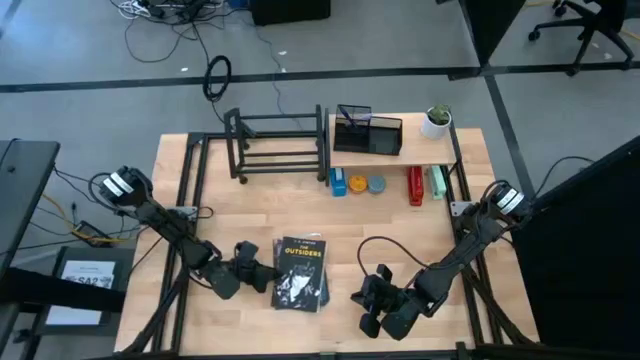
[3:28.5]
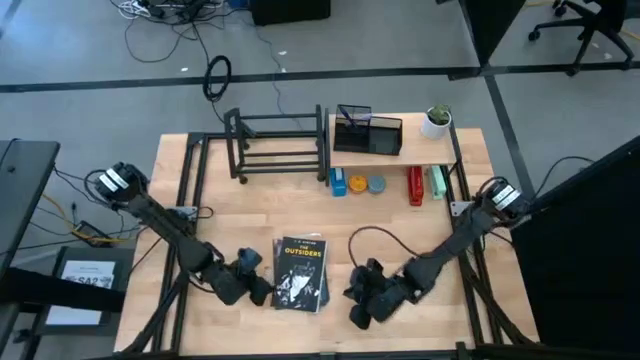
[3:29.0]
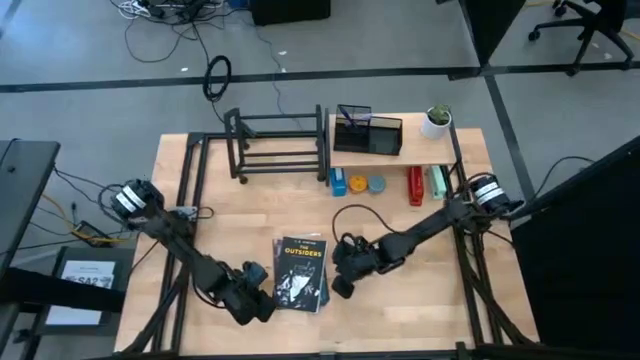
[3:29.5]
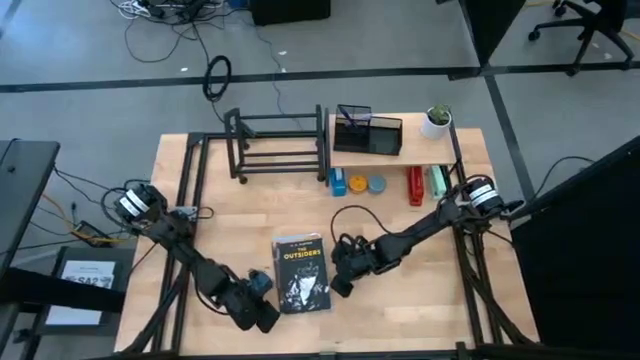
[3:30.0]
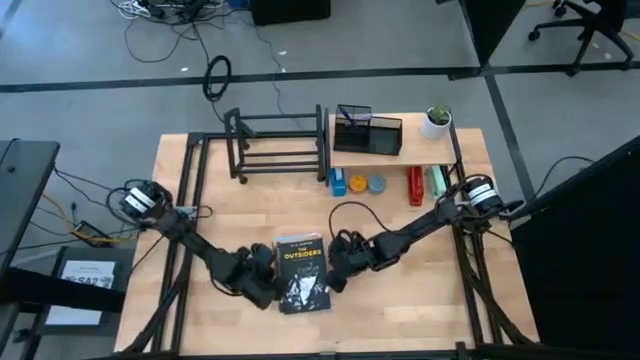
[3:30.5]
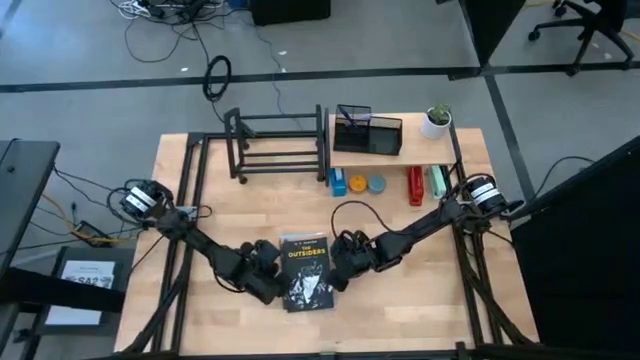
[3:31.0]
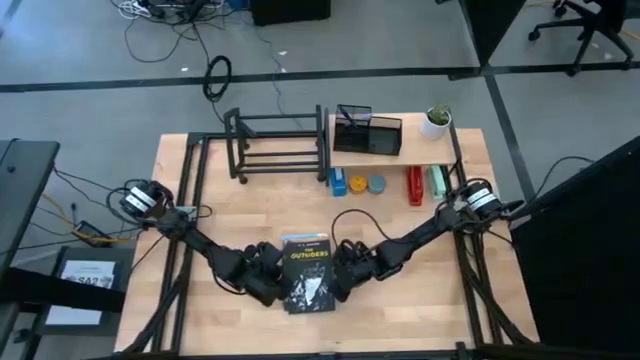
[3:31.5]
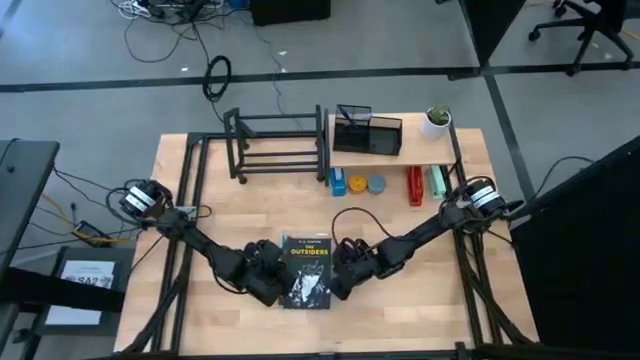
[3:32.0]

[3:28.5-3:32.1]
Task: Stock shelves
Adjust the books on the center of the table

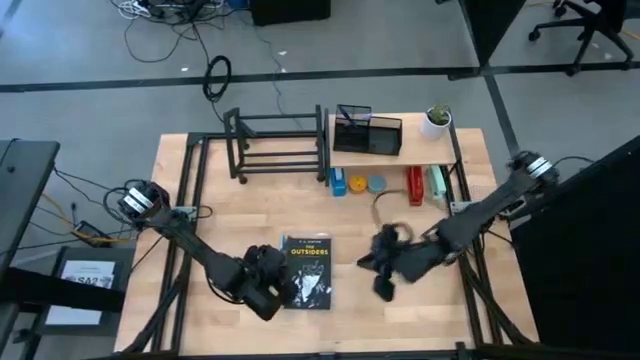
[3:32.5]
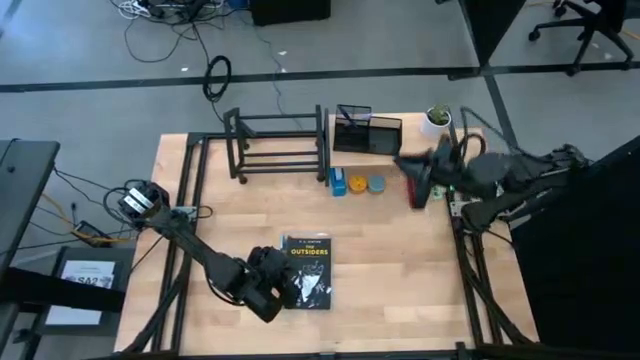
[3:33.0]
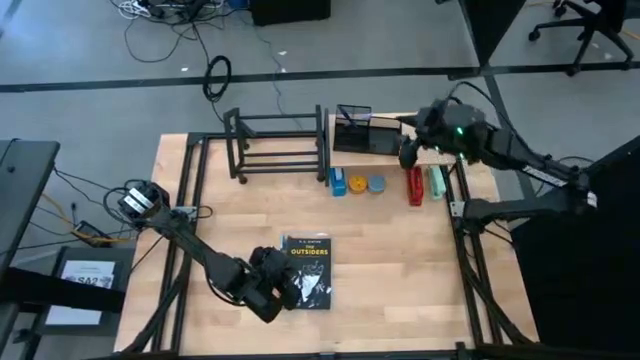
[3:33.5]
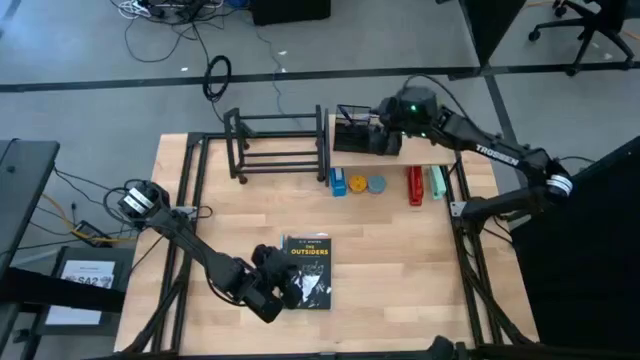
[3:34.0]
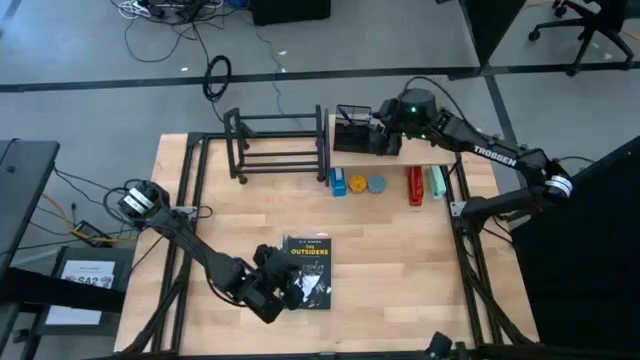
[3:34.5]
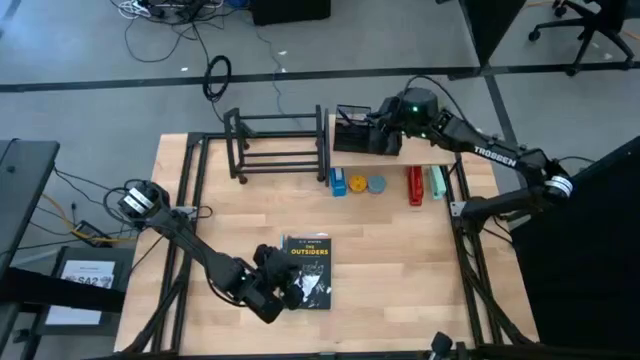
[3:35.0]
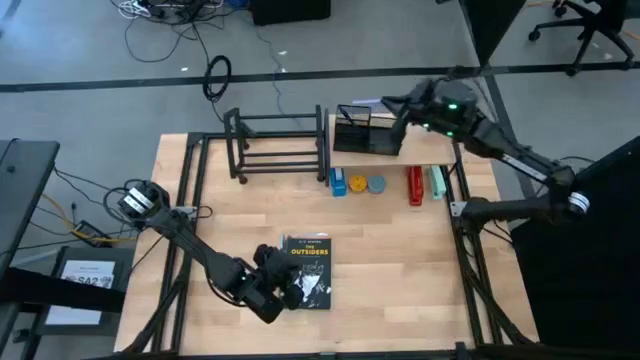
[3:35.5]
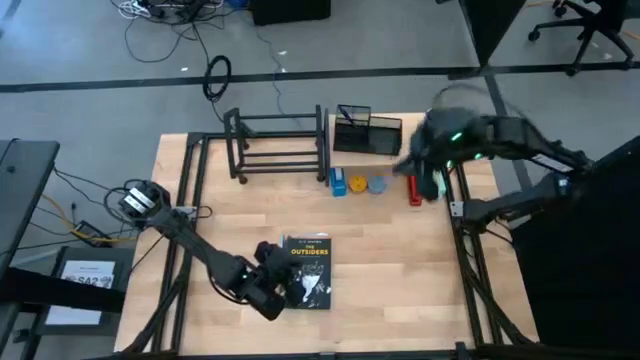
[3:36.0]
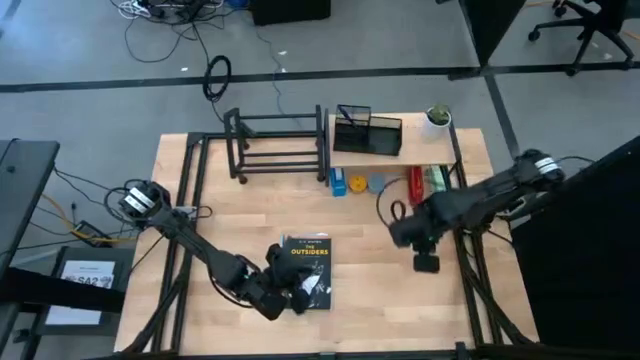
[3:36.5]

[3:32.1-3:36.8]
Remove the purple ballpen from the pen holder

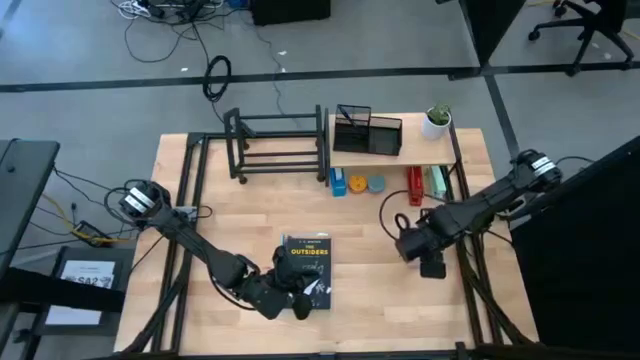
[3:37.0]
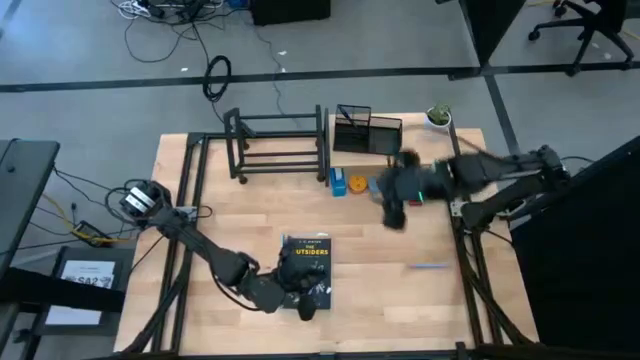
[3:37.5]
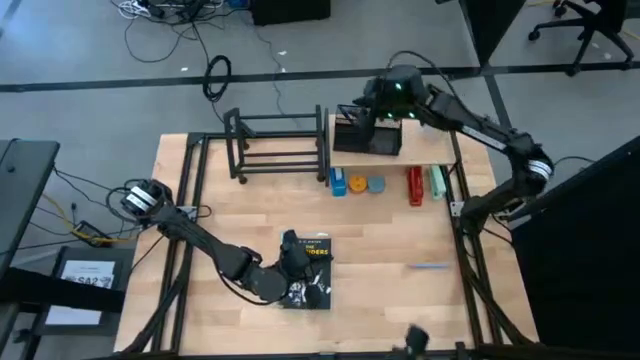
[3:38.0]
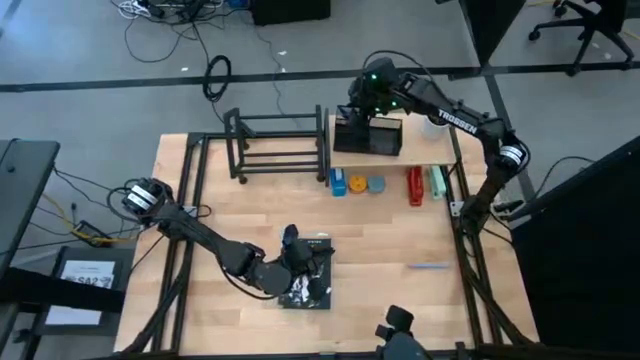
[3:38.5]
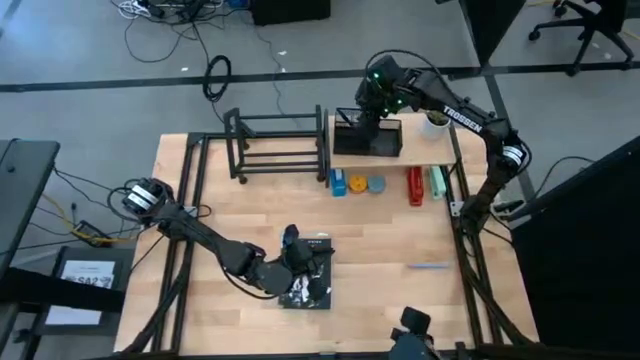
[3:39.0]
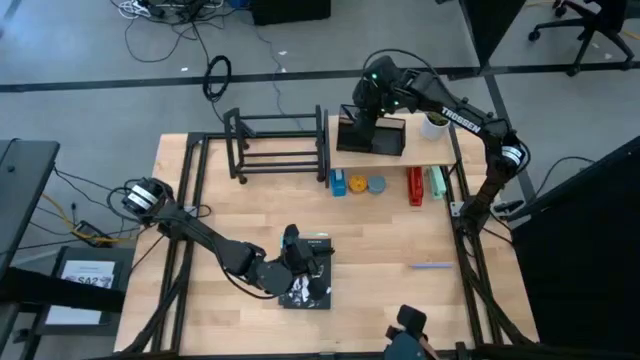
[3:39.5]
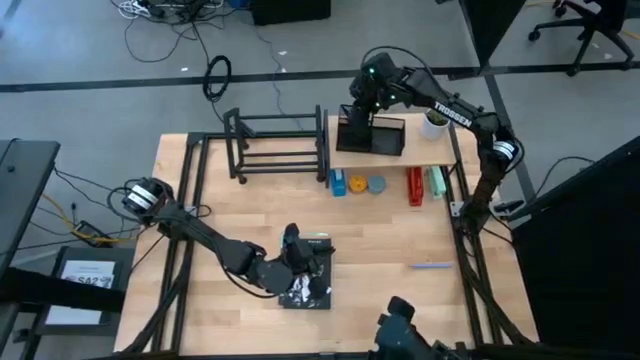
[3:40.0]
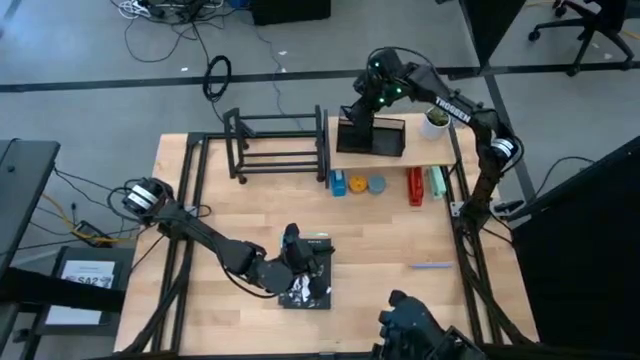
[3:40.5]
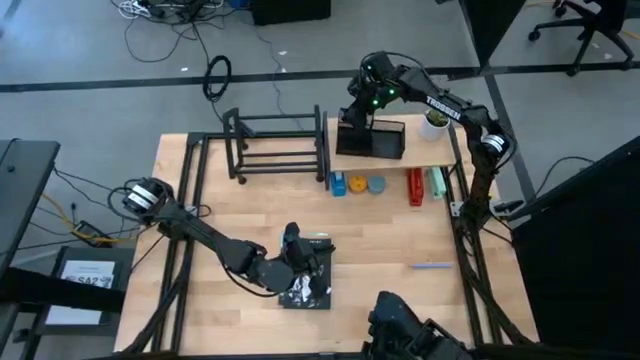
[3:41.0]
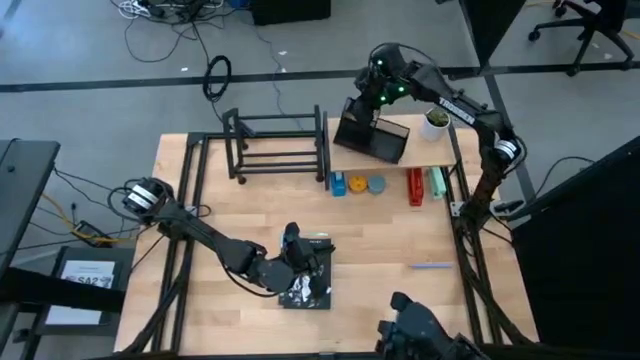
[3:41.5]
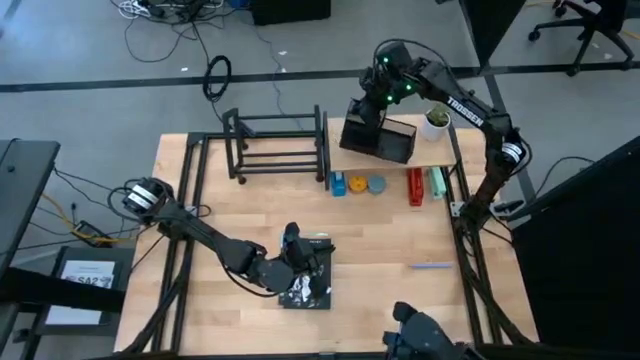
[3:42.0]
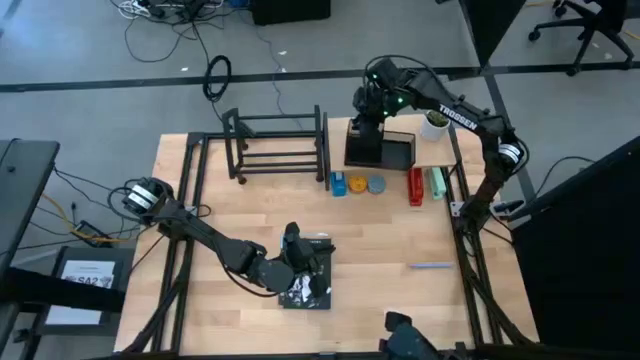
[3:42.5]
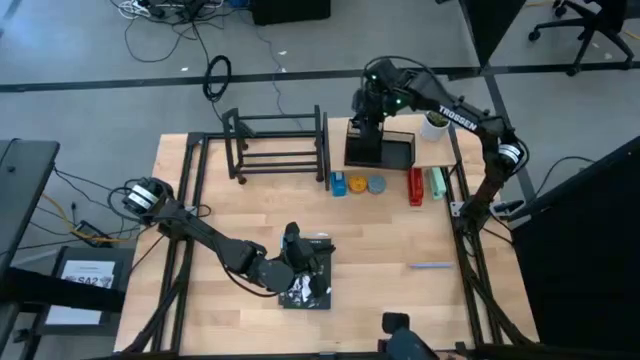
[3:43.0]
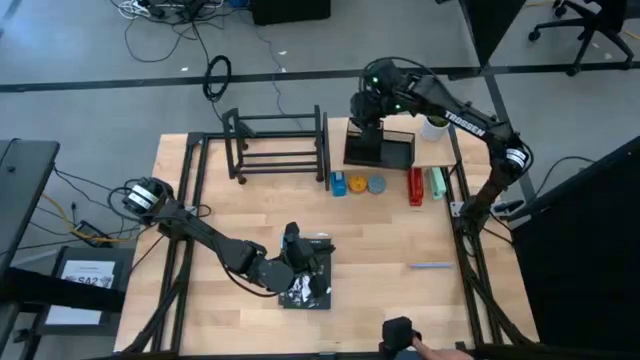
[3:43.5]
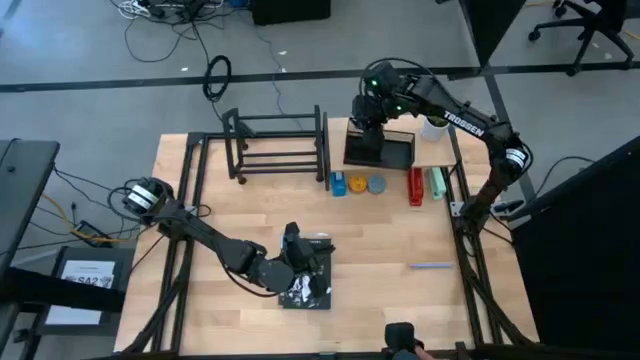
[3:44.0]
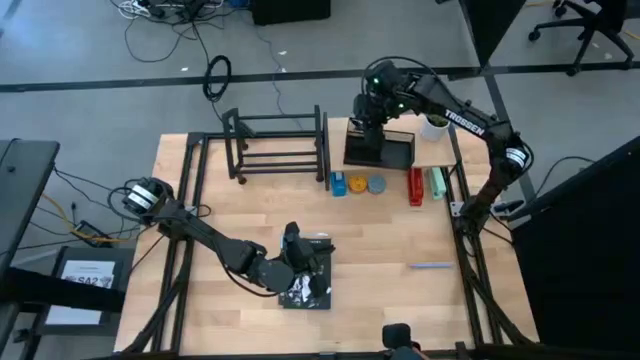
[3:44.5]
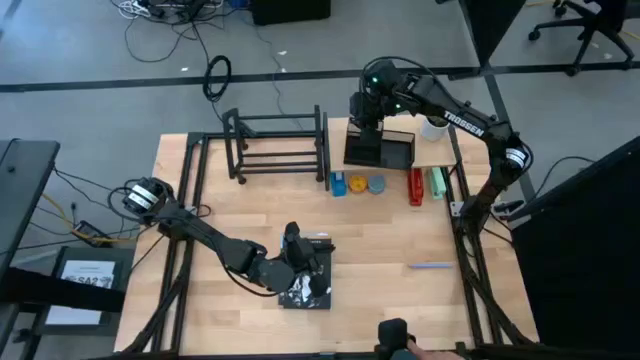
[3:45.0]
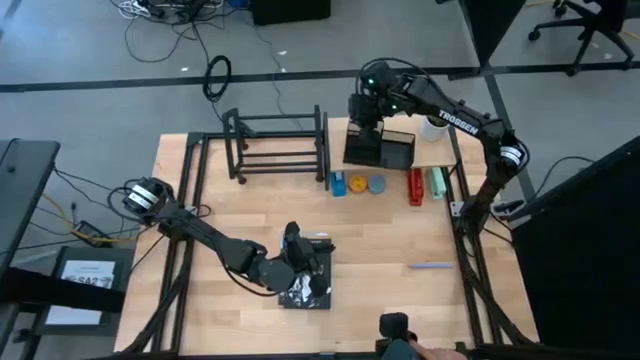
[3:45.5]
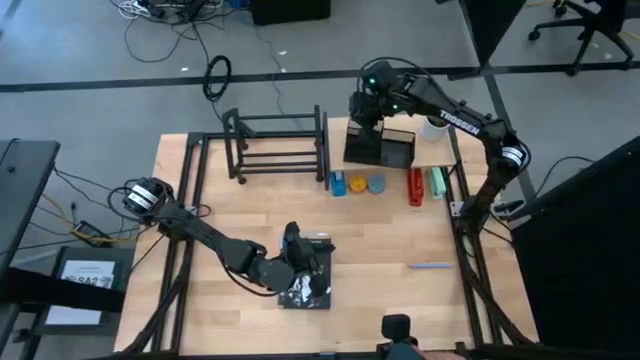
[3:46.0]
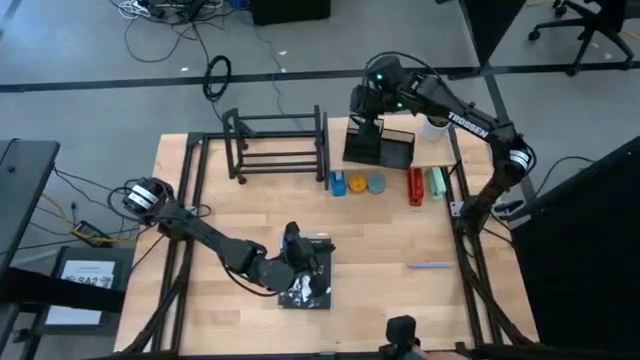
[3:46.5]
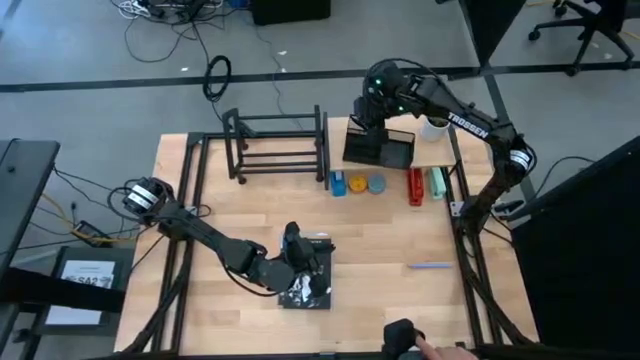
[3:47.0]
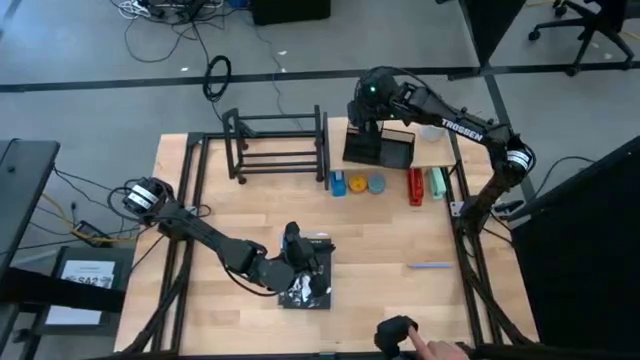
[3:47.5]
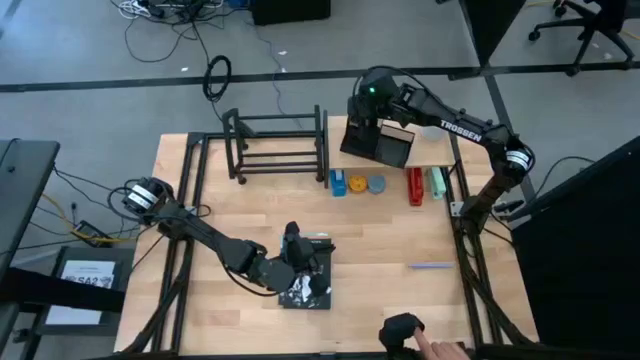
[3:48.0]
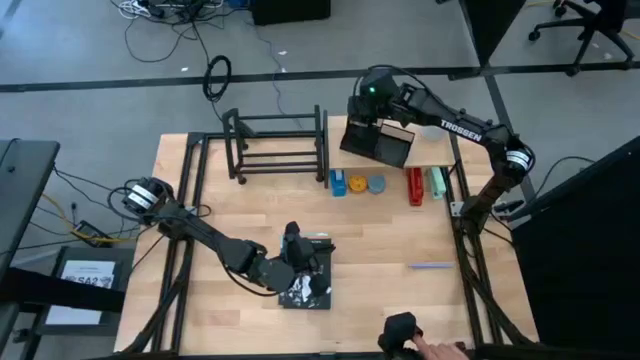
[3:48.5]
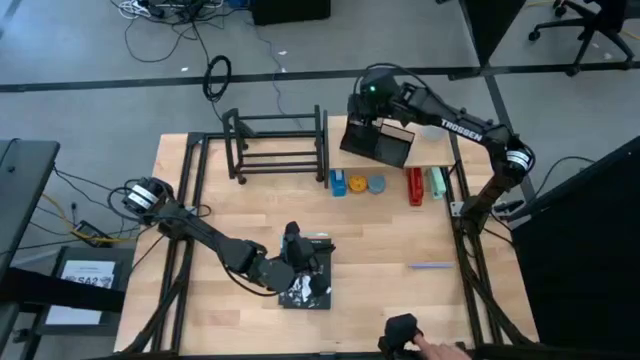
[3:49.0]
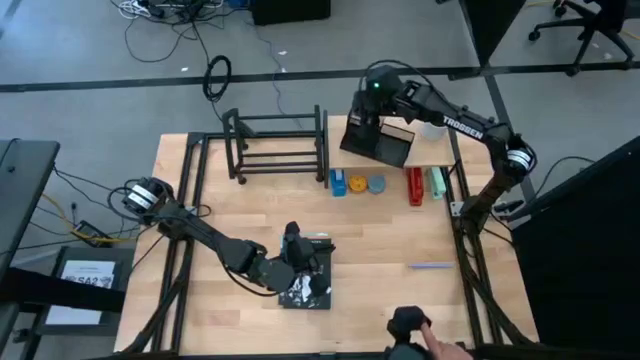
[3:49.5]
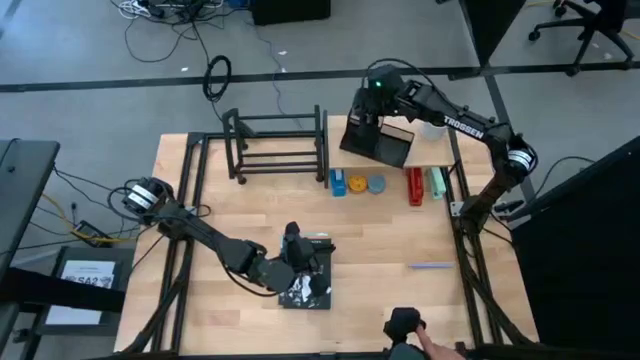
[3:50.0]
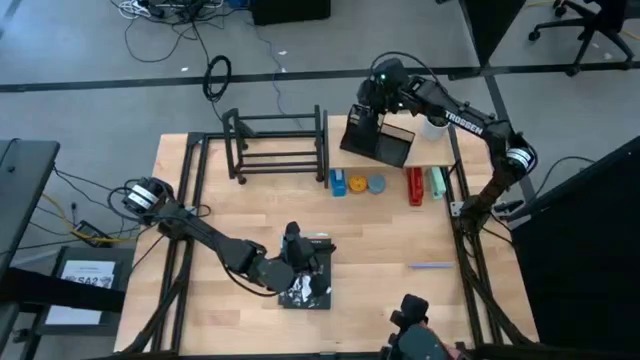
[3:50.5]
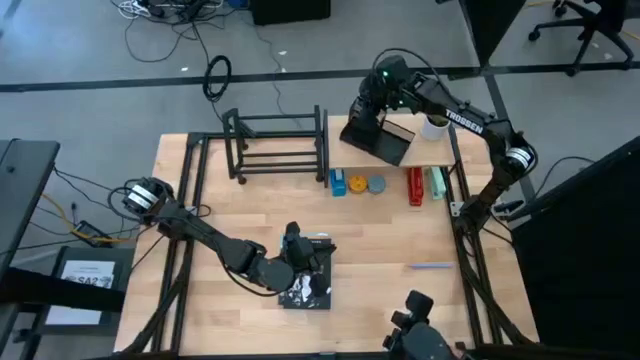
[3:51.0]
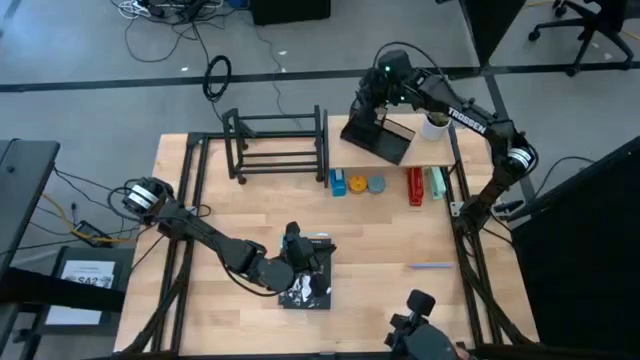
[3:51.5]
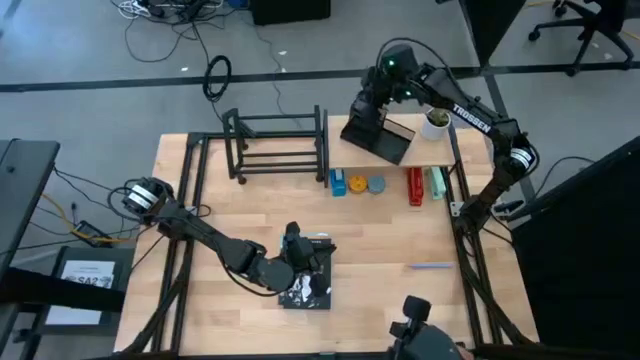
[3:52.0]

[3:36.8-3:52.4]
Remove the white vase plant from the shelf
